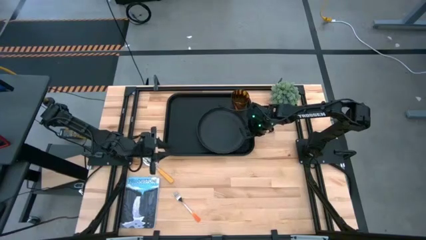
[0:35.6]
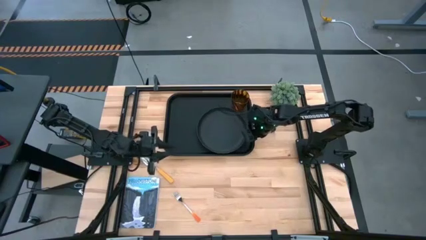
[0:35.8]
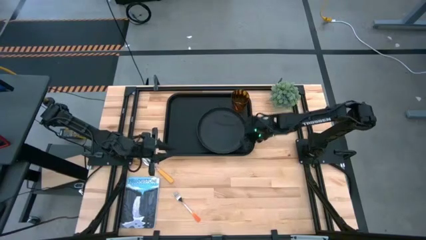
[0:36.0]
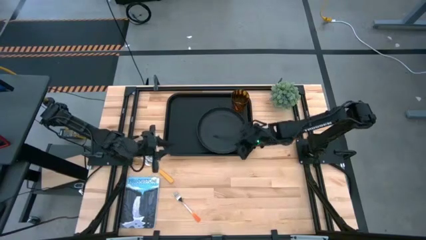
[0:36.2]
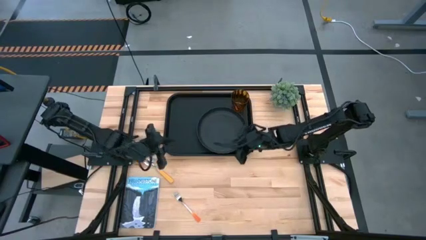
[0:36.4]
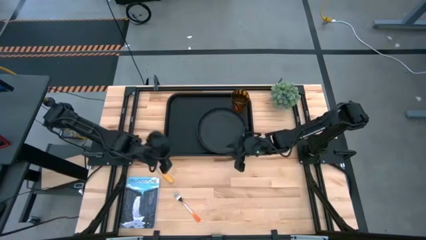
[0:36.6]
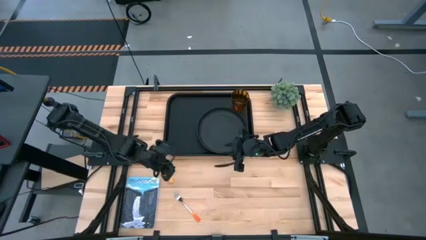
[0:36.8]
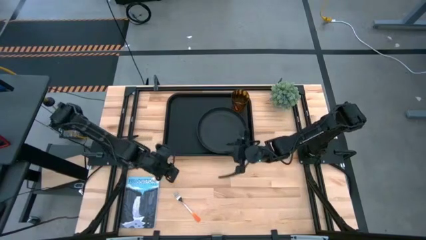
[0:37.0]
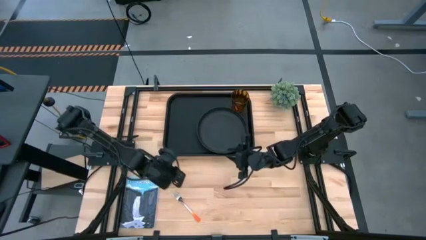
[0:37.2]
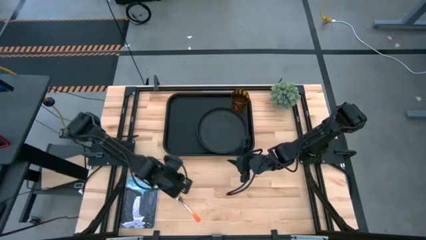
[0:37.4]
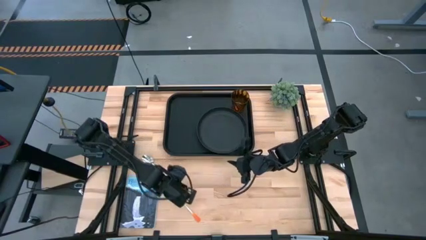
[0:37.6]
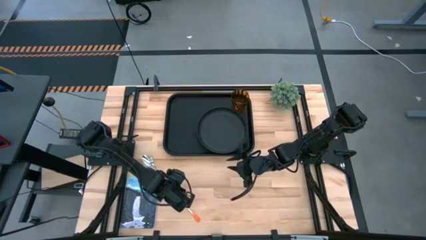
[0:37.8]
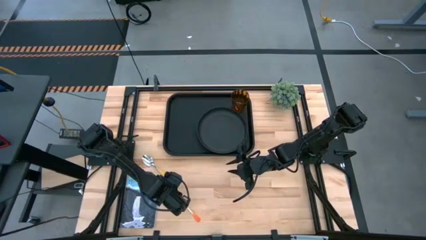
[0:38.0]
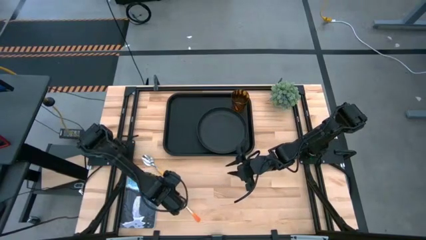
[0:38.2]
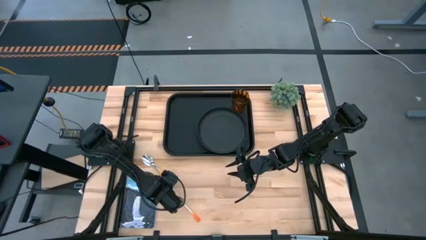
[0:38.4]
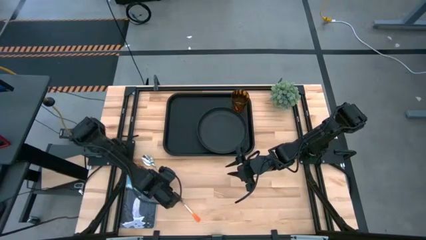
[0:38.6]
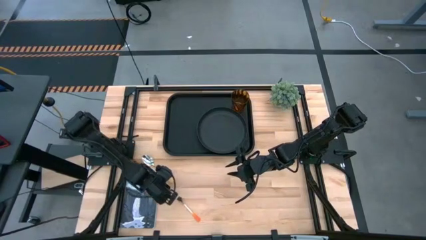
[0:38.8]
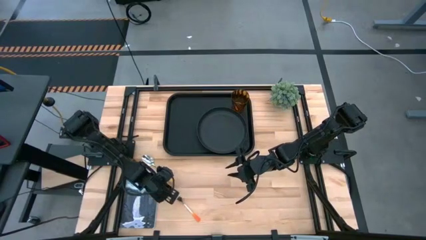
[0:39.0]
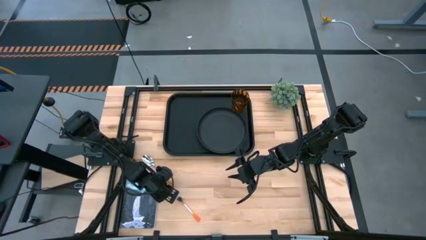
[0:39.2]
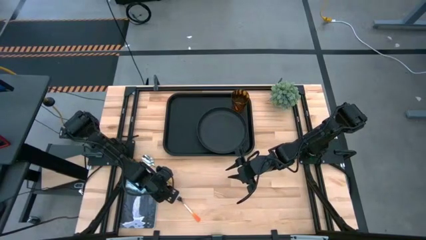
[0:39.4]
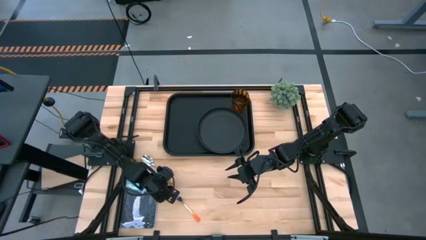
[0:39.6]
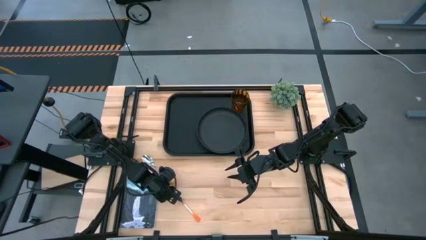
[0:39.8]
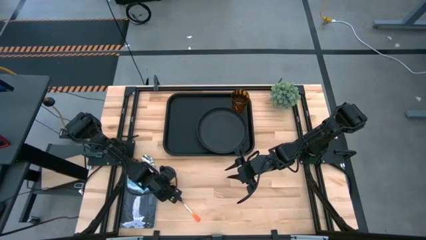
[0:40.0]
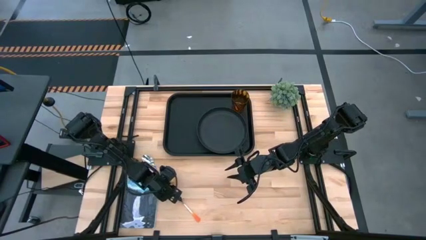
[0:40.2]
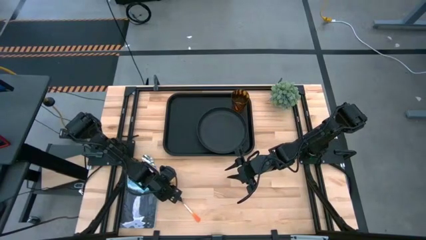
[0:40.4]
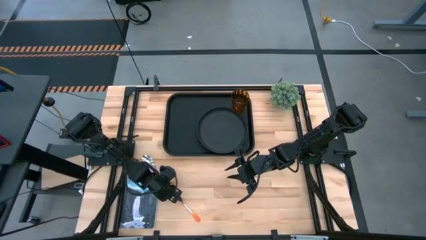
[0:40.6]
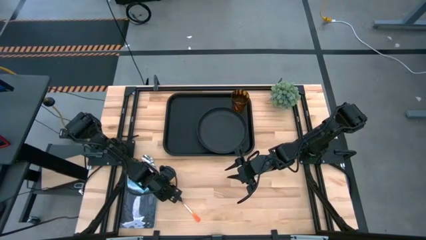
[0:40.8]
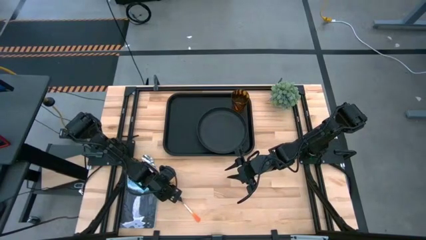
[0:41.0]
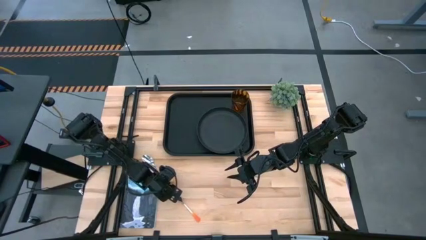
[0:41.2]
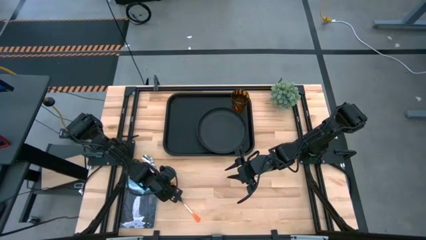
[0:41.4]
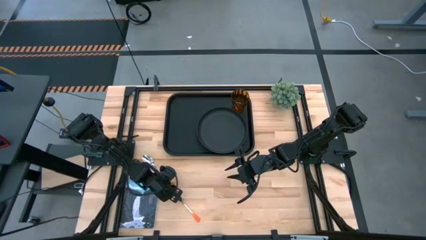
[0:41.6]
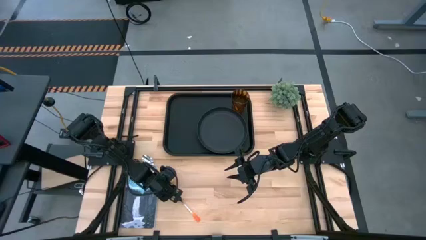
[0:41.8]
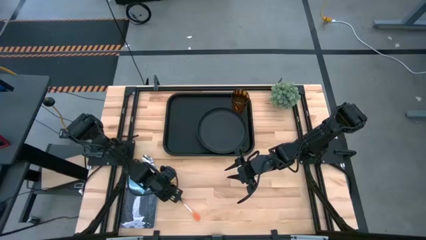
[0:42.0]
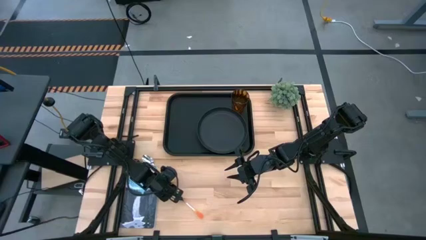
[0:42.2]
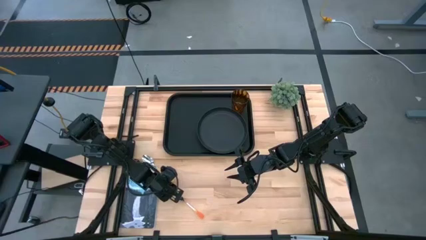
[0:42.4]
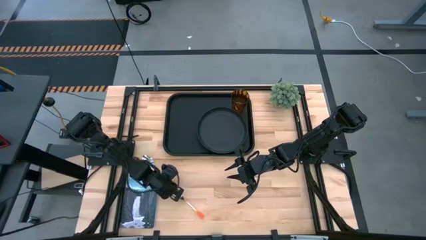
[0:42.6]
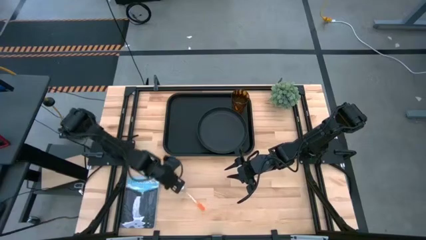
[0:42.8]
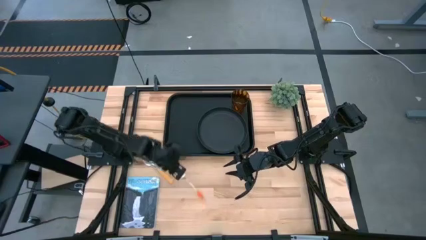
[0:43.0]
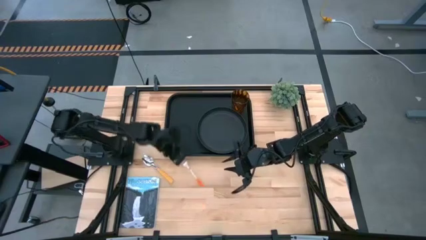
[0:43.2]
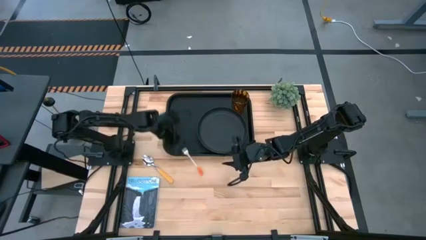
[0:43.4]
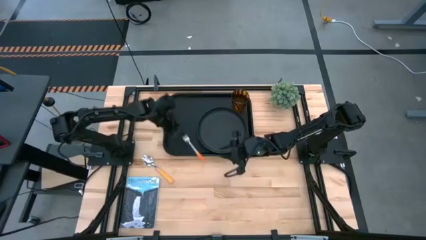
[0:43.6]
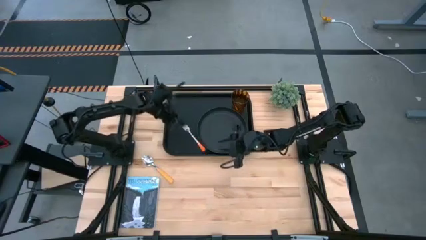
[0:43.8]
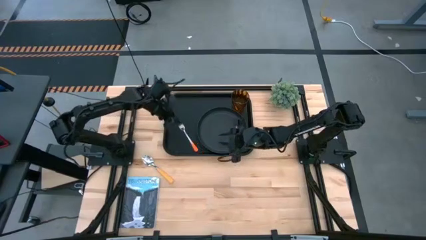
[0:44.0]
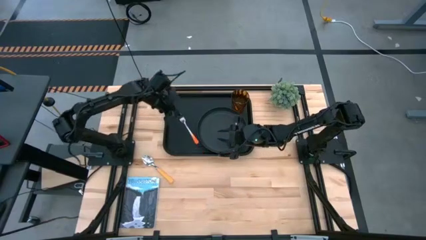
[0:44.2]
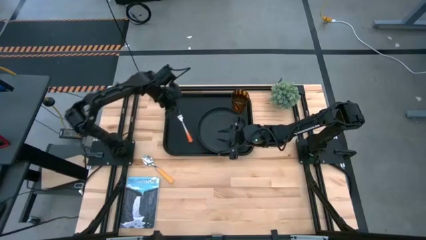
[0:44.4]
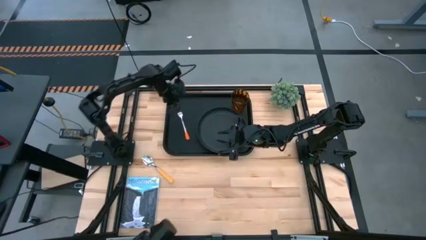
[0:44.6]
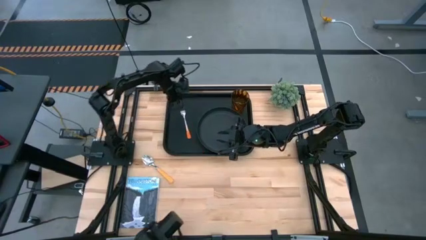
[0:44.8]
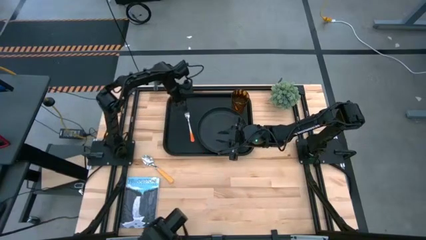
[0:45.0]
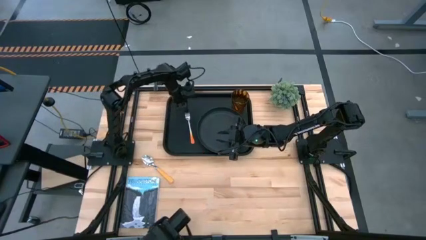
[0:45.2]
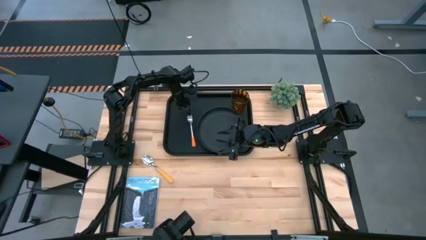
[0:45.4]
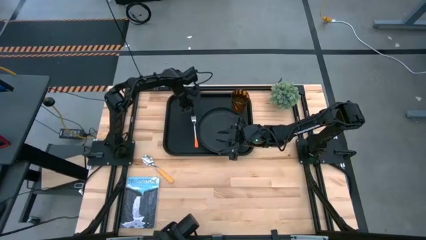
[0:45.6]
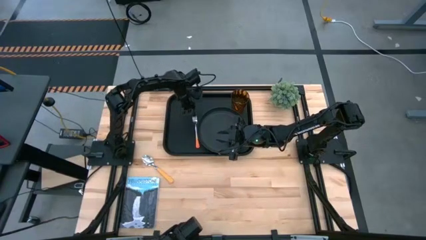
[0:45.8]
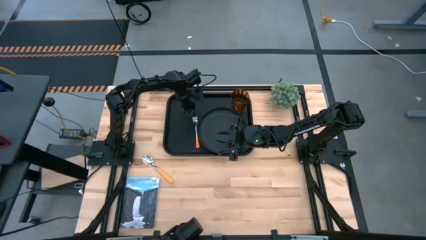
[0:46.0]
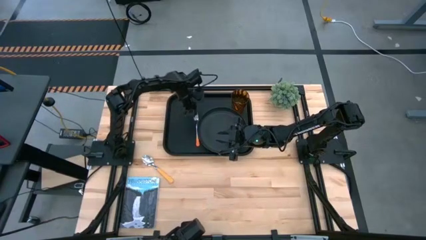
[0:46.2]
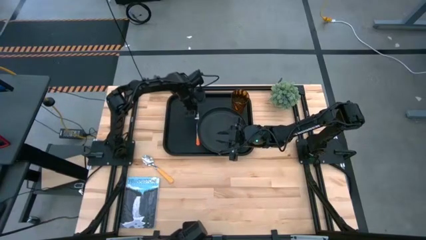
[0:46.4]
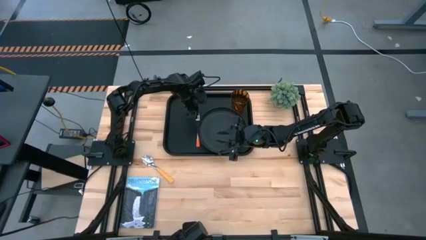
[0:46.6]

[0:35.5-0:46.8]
Task: Pick and place plate/cup/fork/spoon on tray
Put the orange fork on the black tray to the left of the black plate

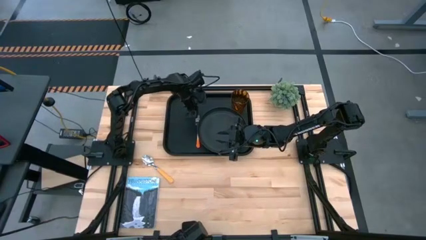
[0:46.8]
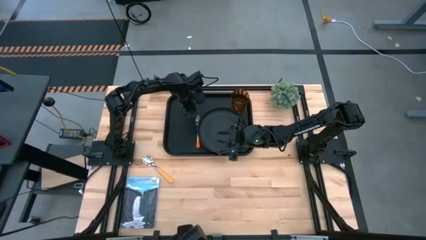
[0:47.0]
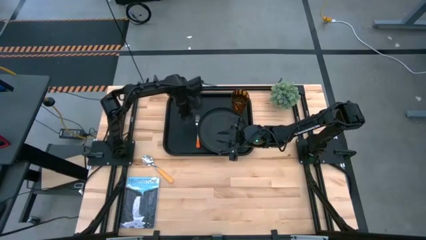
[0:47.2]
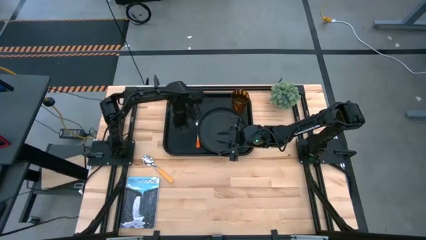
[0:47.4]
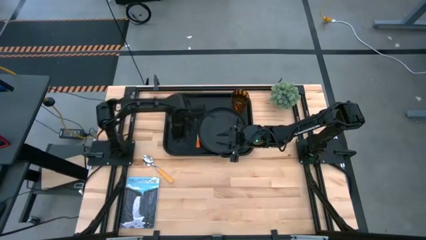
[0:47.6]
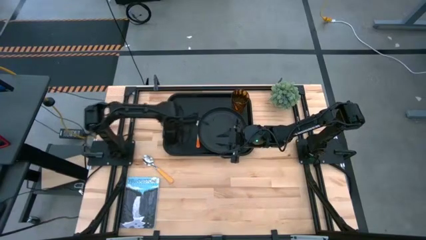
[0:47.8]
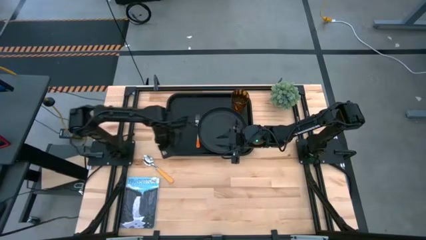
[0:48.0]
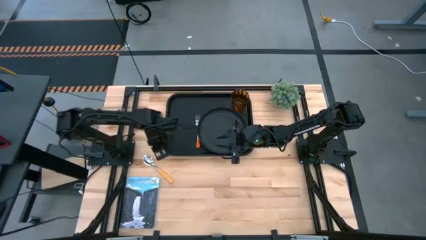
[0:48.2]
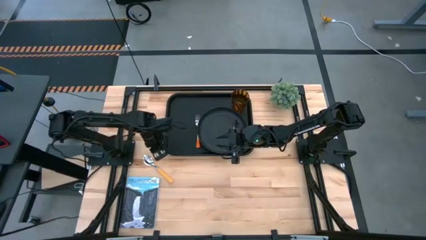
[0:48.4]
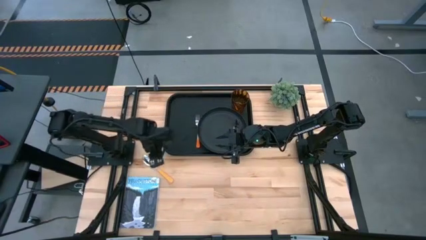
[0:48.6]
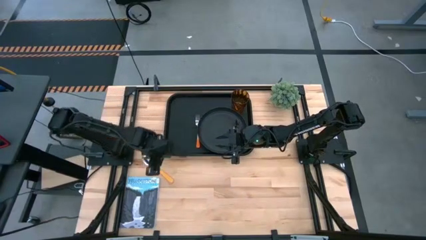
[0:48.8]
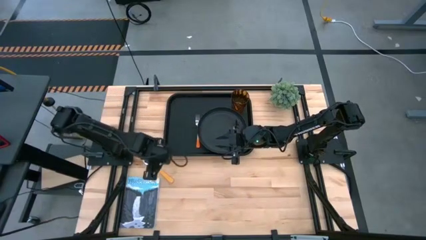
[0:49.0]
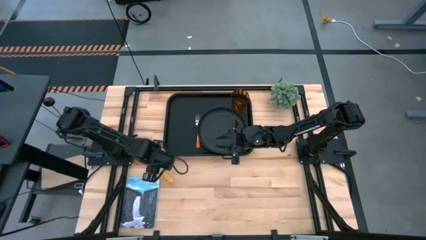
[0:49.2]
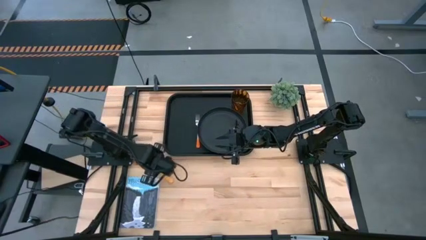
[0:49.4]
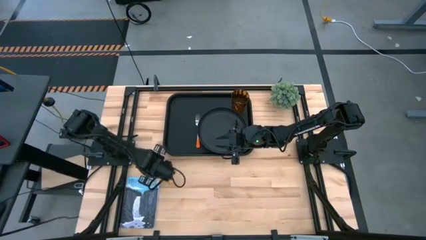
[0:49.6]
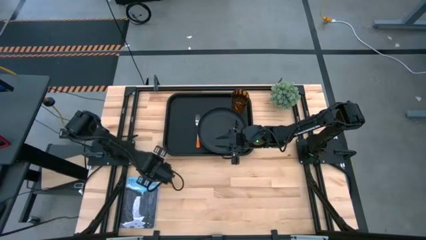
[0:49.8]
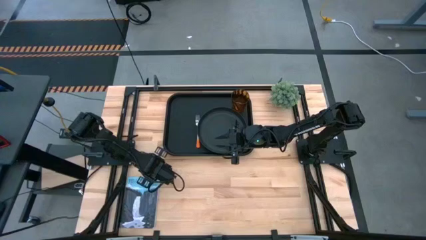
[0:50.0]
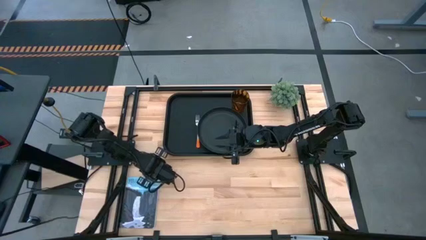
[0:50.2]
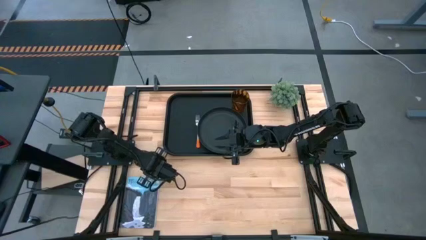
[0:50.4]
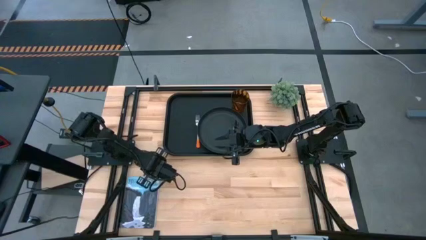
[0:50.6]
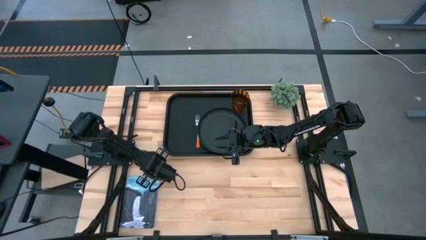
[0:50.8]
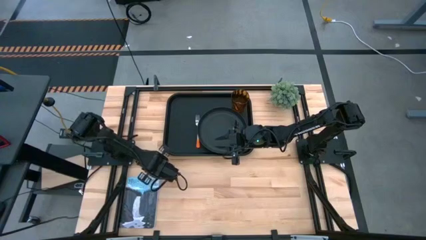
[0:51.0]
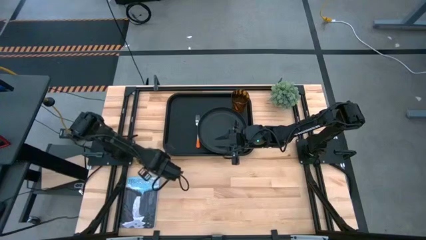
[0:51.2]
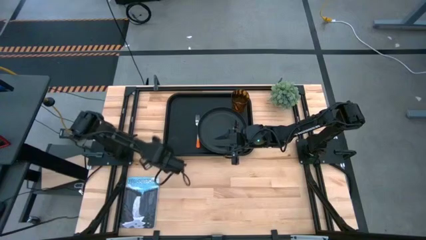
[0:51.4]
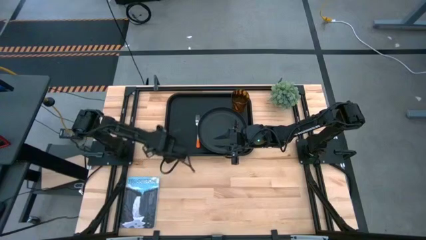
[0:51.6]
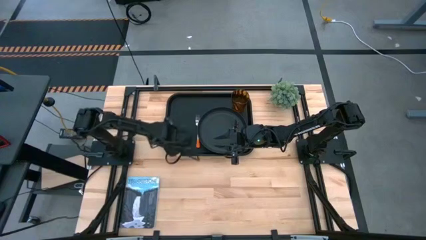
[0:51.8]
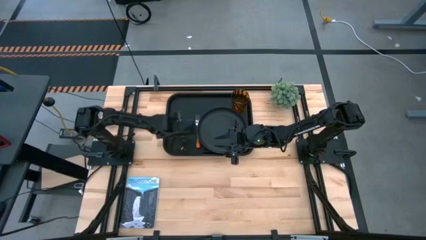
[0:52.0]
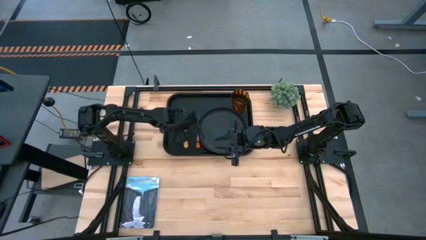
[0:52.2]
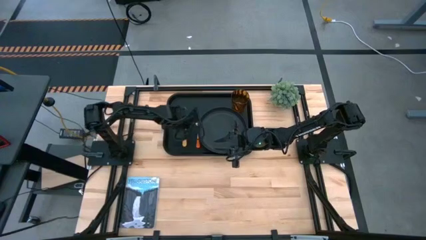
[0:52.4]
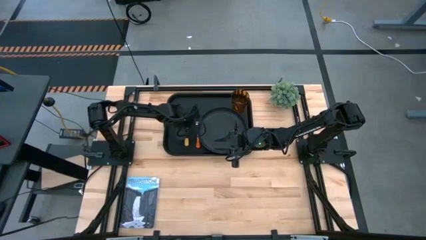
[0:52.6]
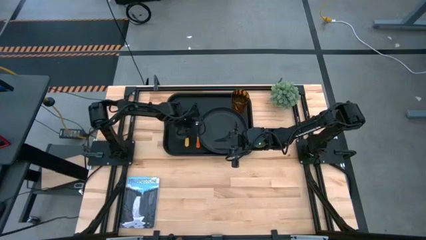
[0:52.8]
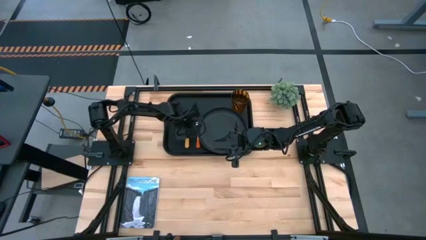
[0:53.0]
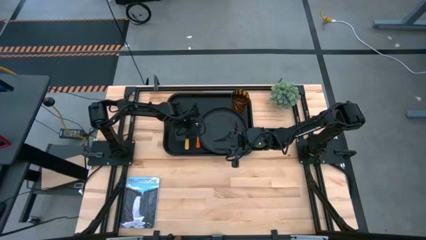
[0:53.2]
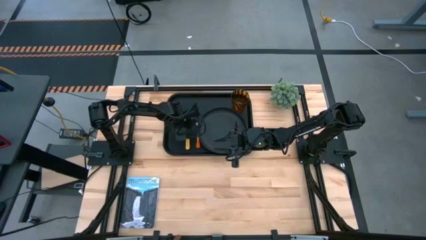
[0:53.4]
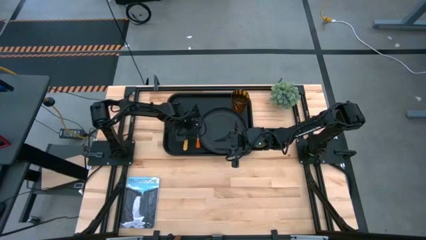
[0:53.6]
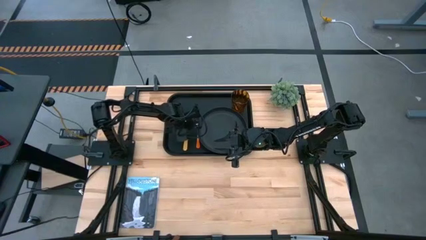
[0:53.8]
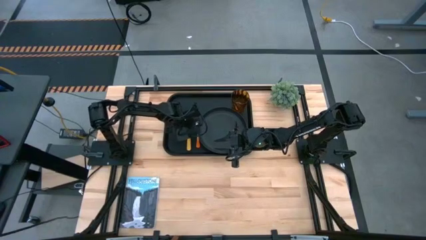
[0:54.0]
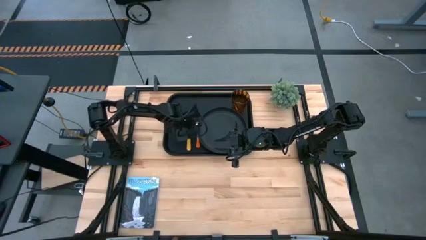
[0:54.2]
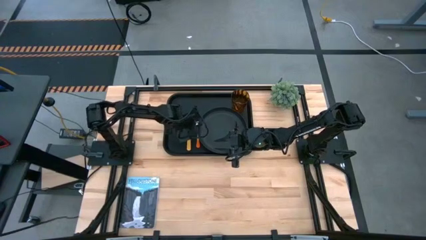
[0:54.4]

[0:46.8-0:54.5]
Put the yellow spoon on the black tray to the left of the orange fork
